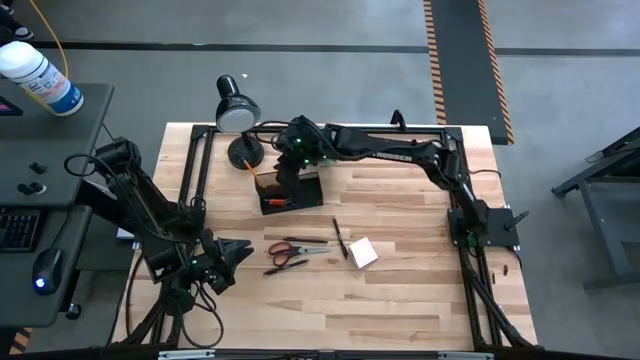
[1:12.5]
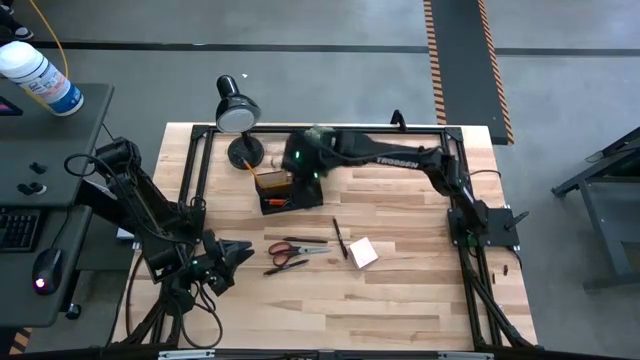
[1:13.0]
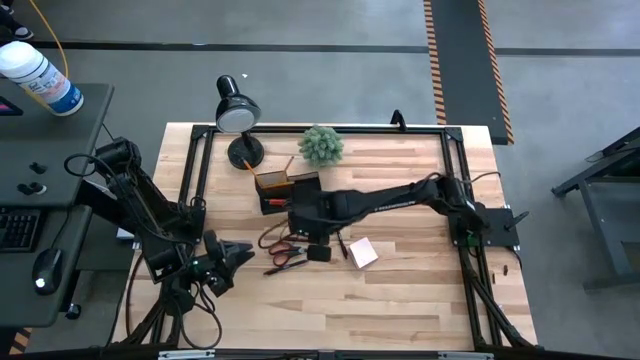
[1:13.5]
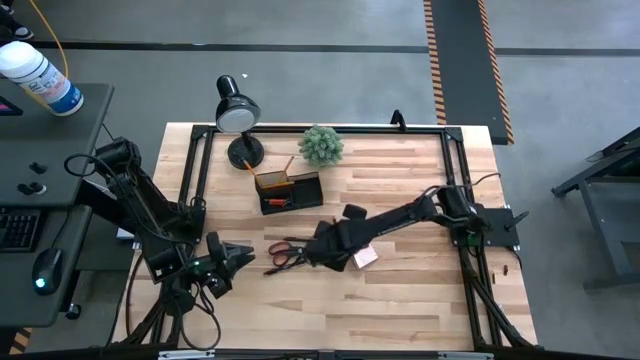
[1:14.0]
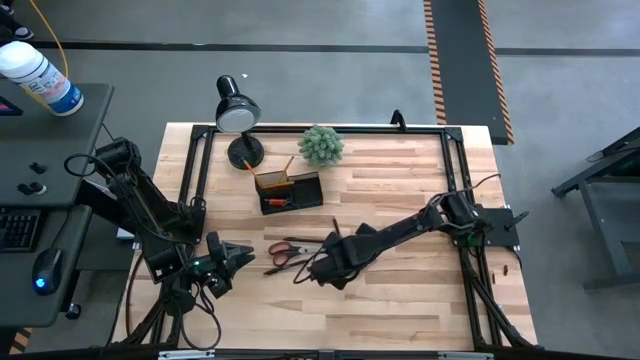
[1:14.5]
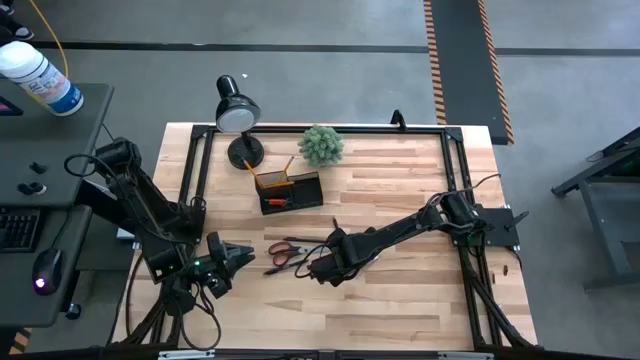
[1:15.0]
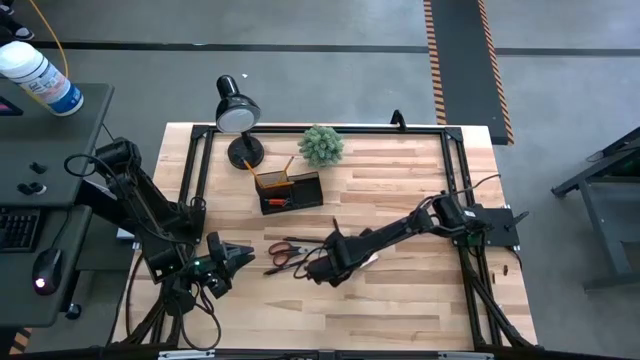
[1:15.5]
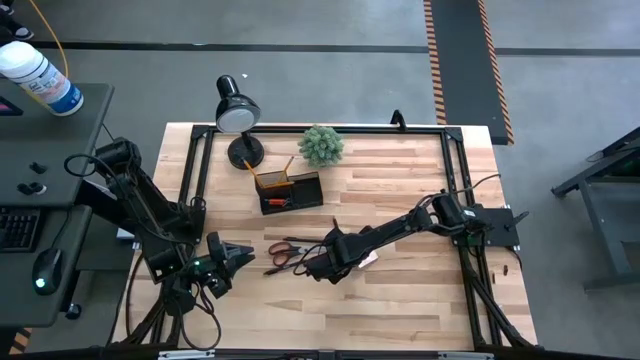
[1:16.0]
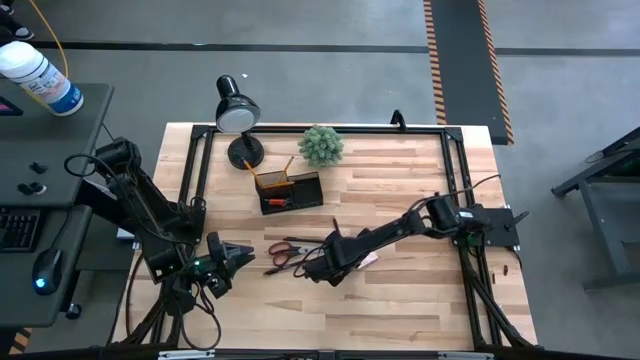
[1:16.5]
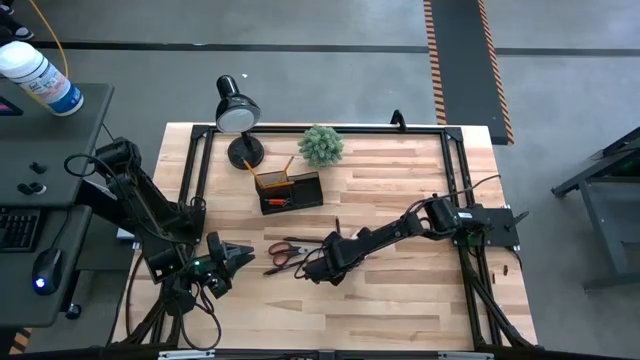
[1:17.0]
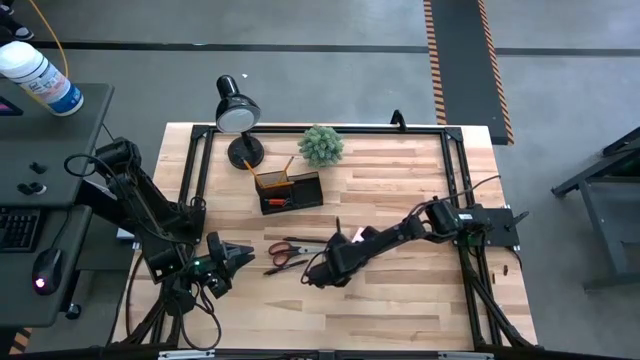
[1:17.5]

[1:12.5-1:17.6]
Task: Pick and place office supplies into organizer
Put the sticky notes into the desktop organizer

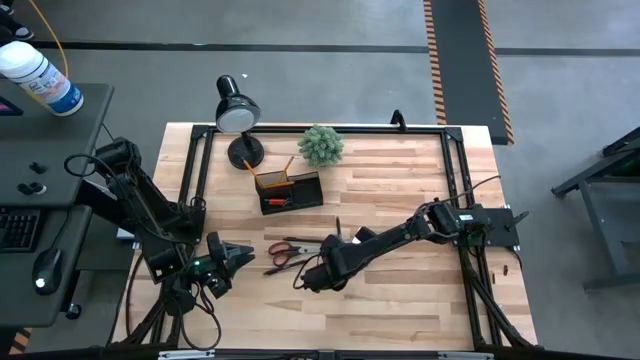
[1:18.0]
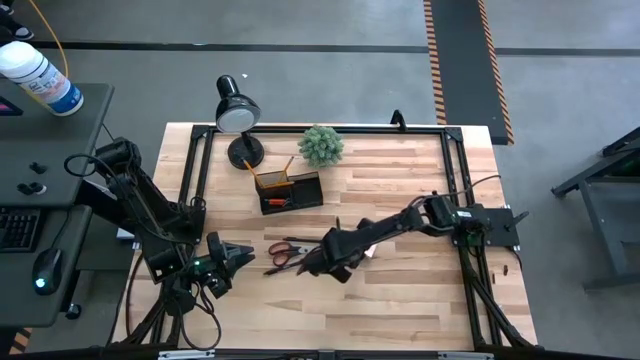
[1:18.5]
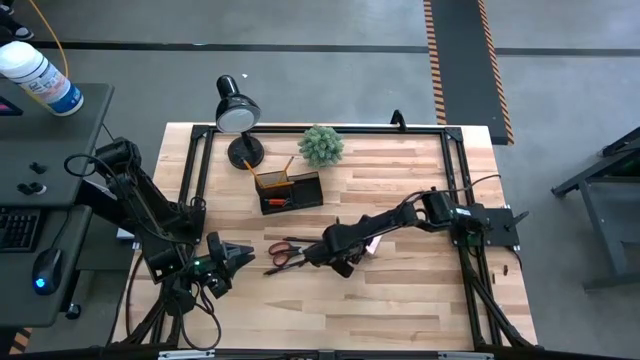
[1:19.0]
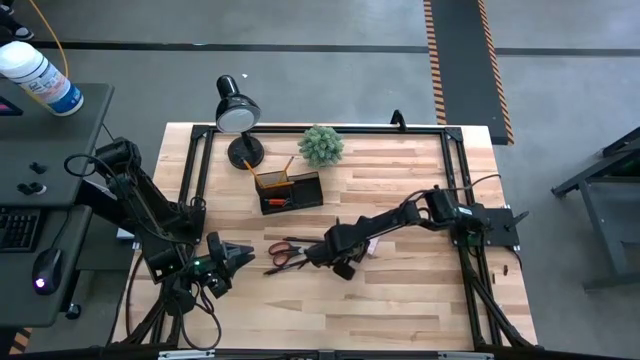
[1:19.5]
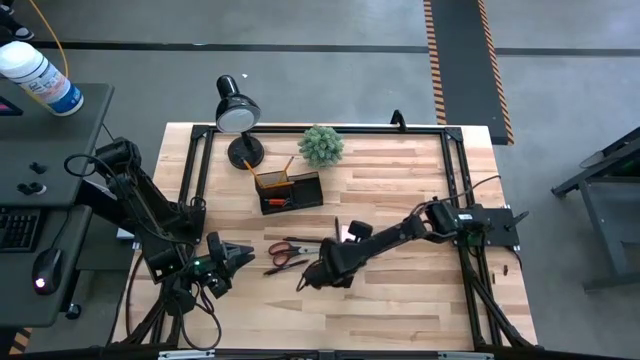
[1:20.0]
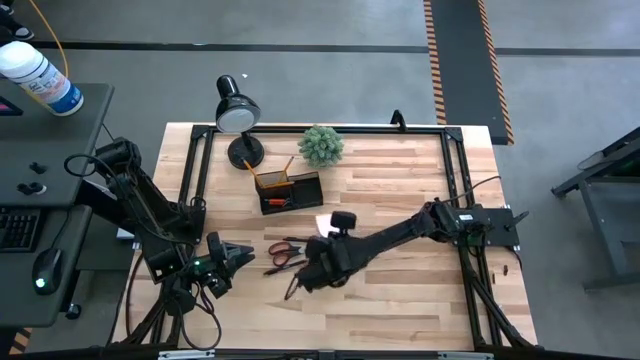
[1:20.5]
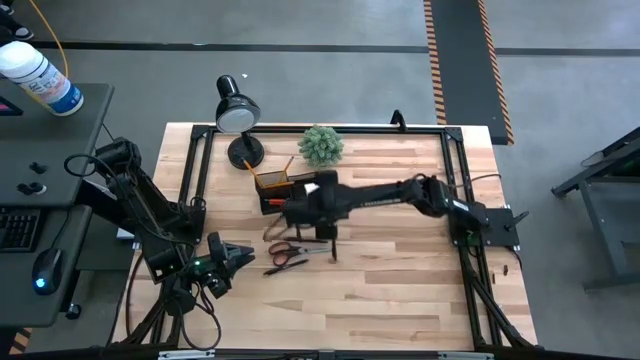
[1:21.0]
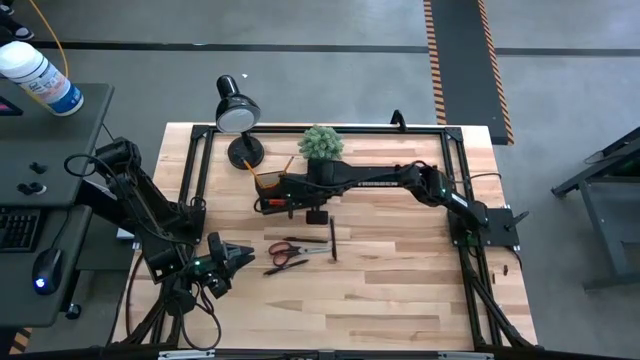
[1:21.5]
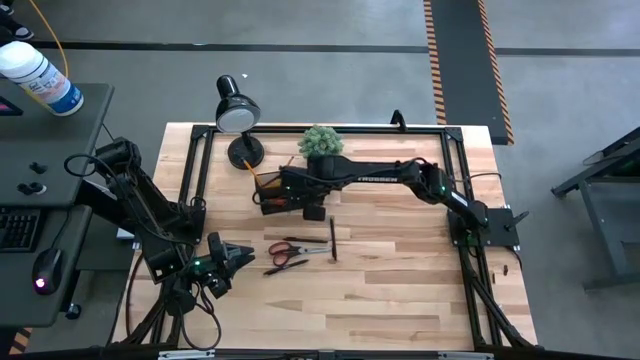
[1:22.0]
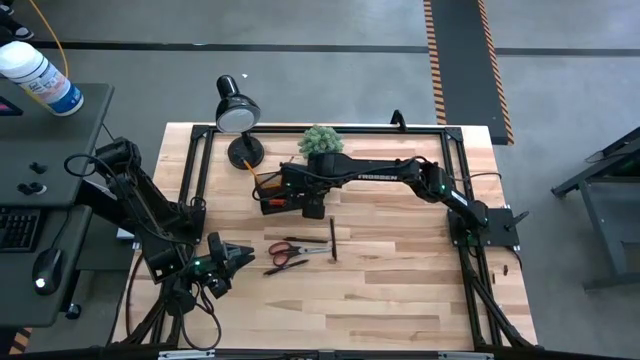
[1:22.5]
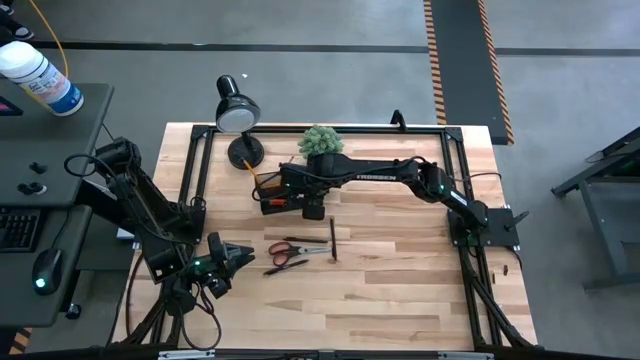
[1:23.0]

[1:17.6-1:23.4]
Put the sticky notes into the desktop organizer

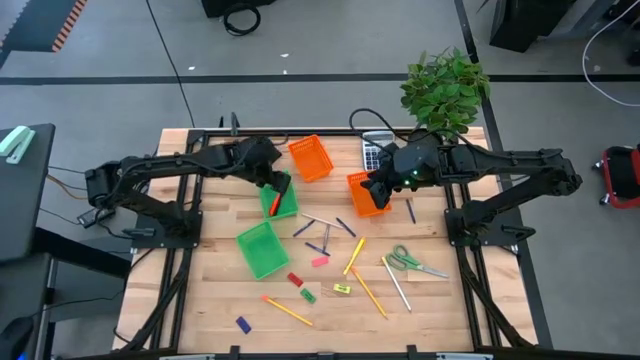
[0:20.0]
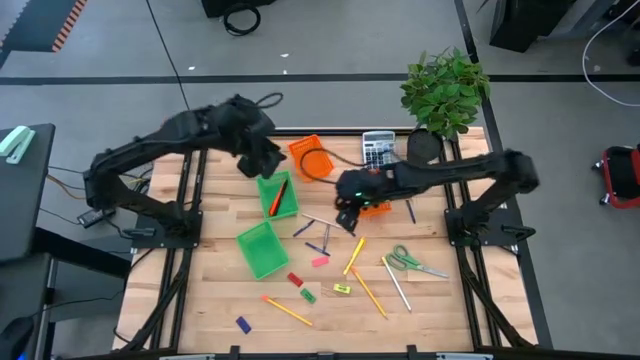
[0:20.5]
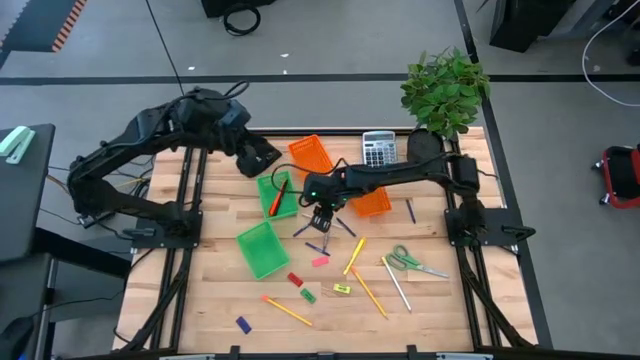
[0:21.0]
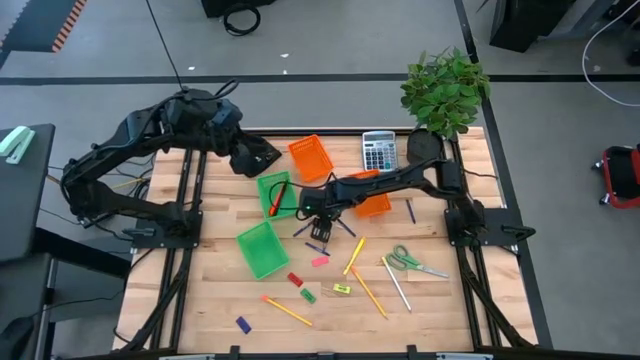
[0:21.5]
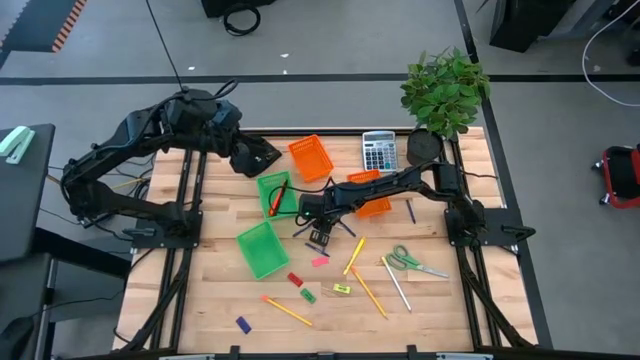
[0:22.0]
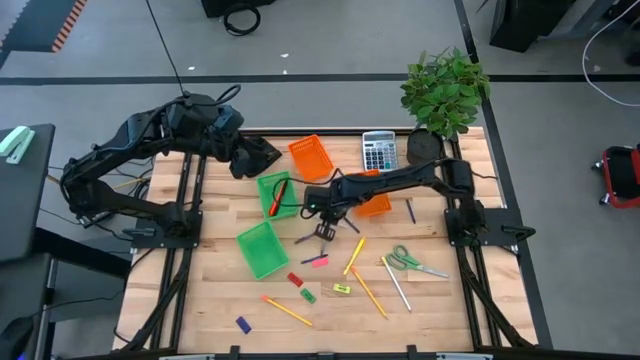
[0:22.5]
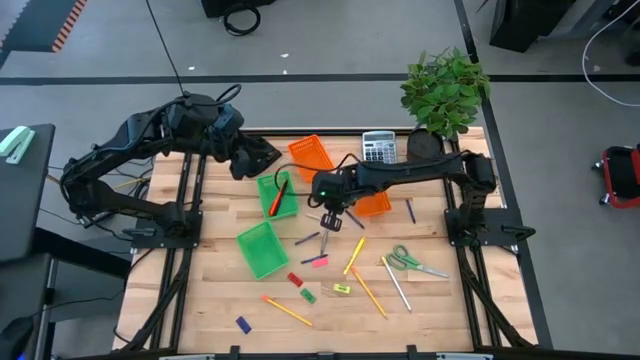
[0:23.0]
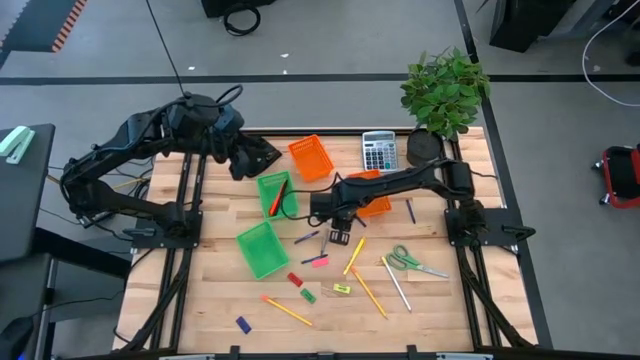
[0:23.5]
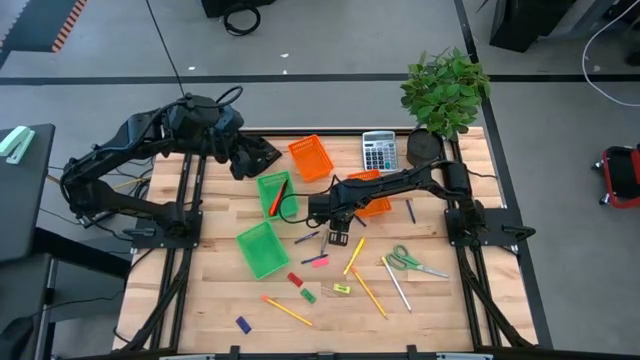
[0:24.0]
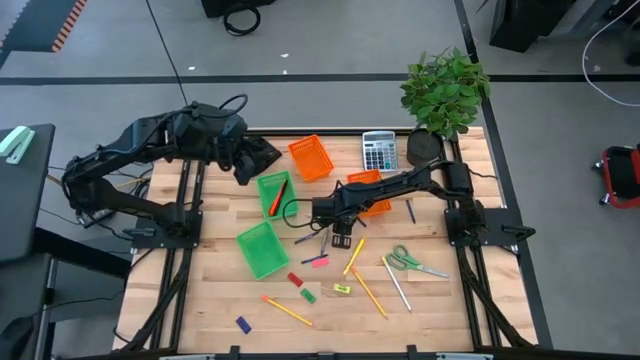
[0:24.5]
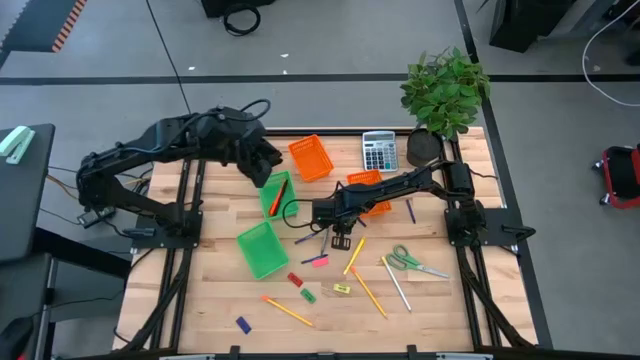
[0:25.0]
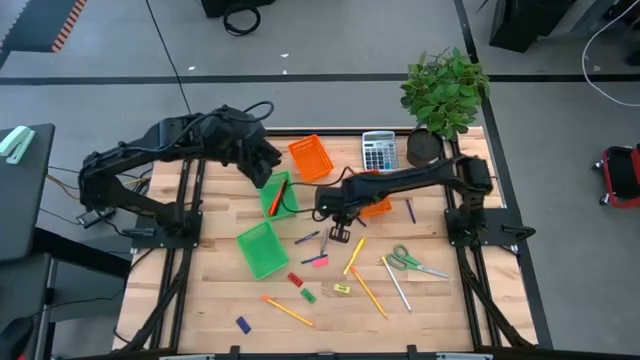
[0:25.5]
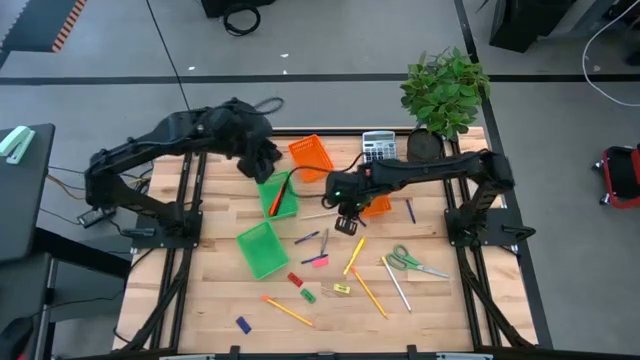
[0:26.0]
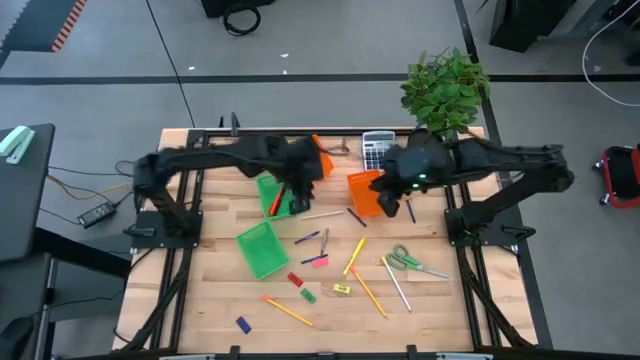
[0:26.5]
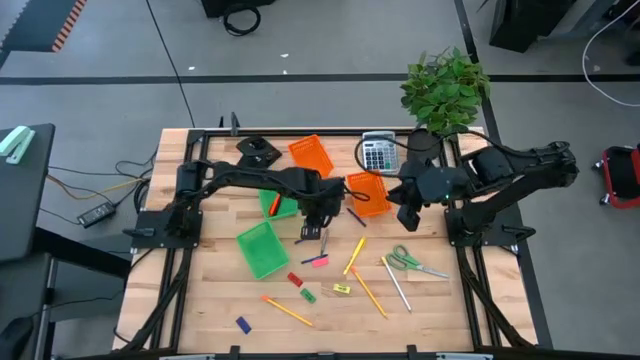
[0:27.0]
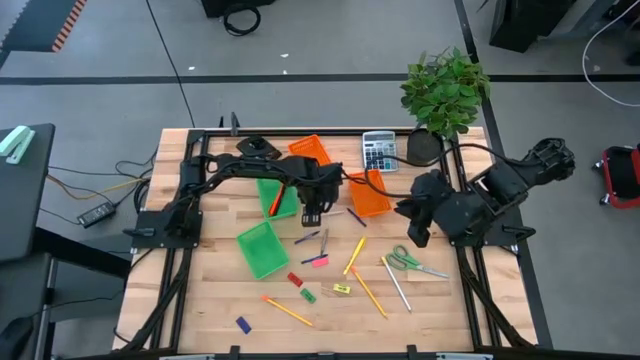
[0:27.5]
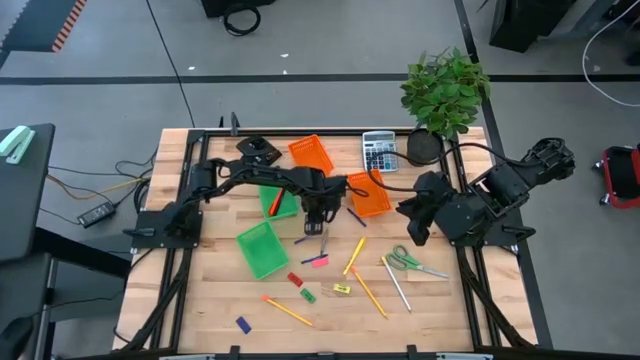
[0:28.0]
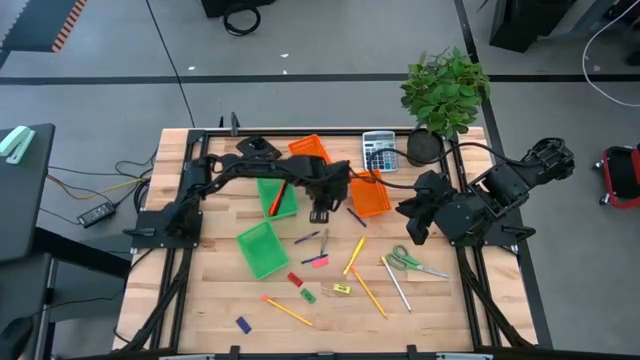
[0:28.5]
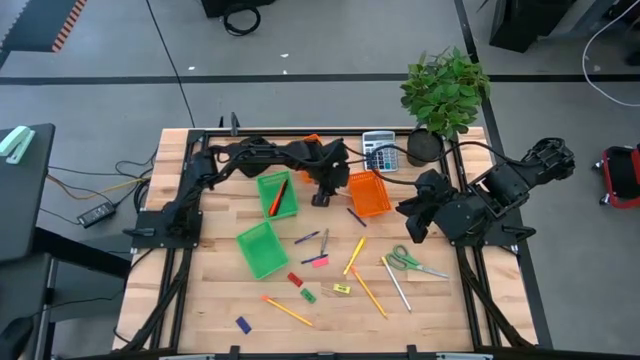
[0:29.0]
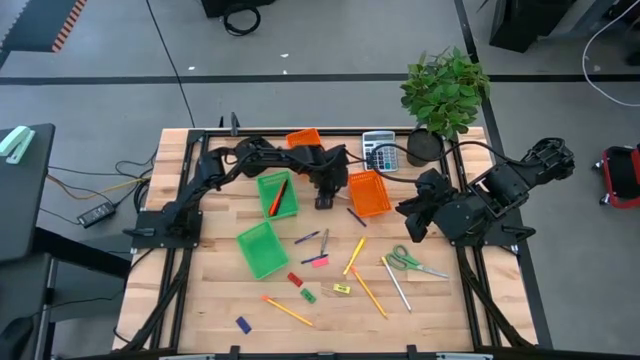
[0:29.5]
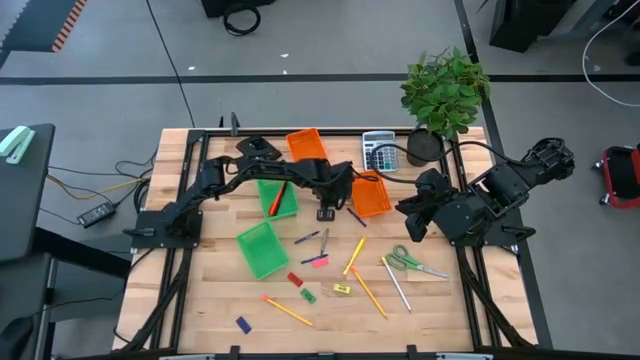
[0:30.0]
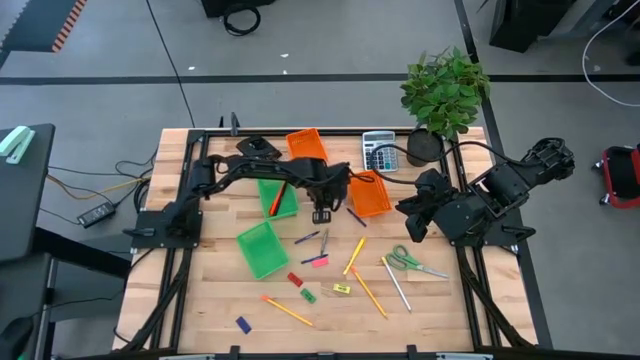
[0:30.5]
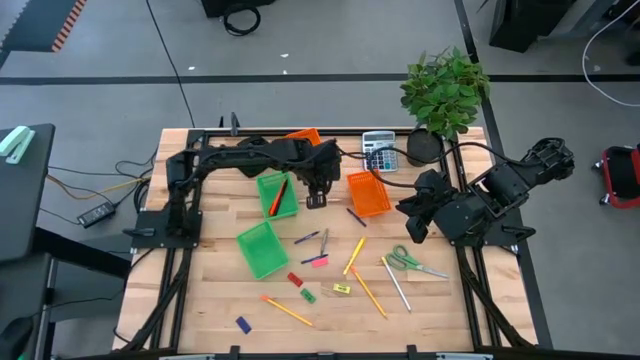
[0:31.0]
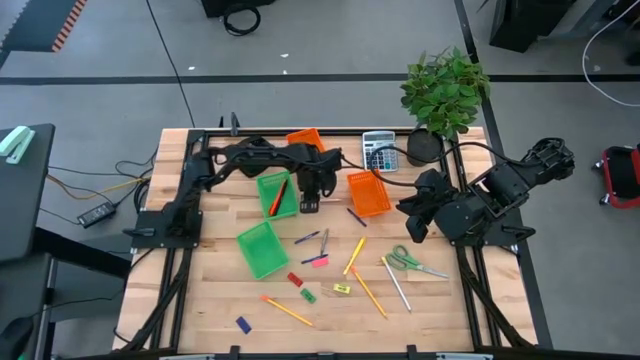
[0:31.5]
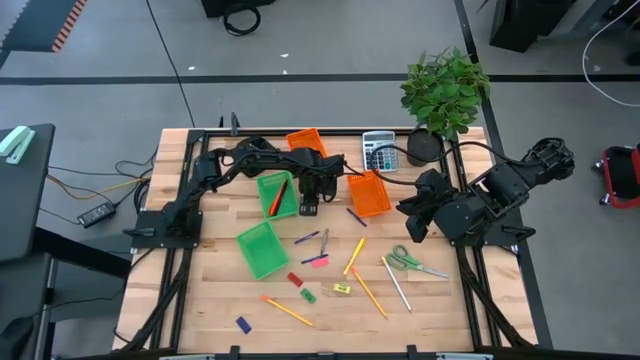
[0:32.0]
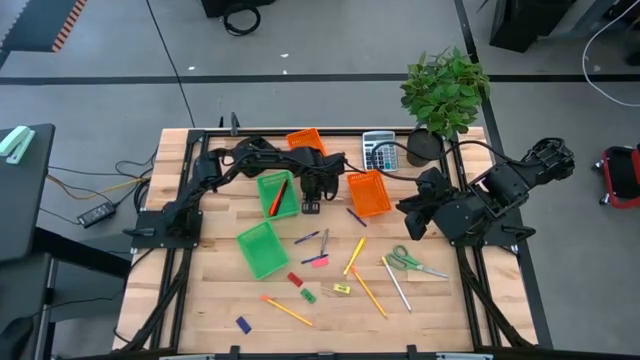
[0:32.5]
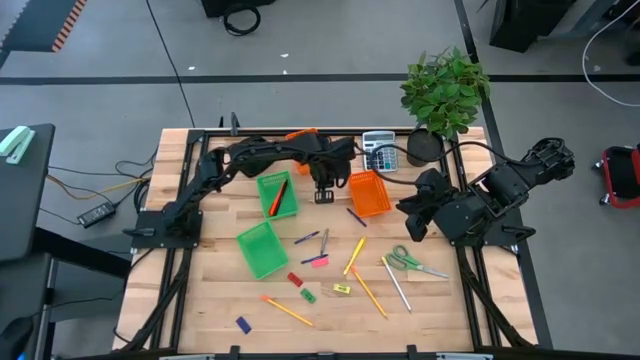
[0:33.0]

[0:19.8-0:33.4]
Task: Sort crayons/erasers/pens/pencils in bins
Put the pink pen into the top green bin
